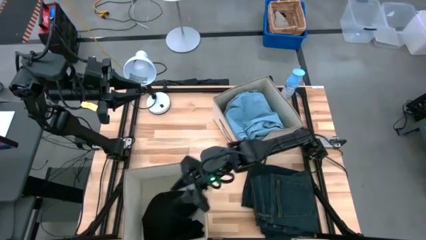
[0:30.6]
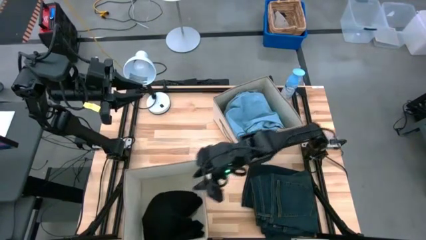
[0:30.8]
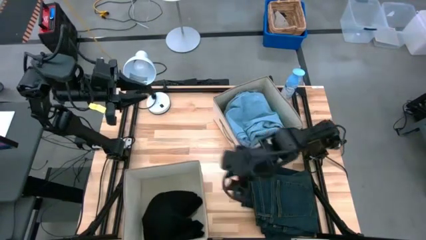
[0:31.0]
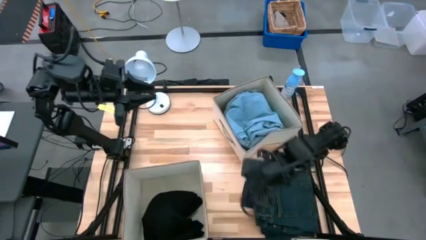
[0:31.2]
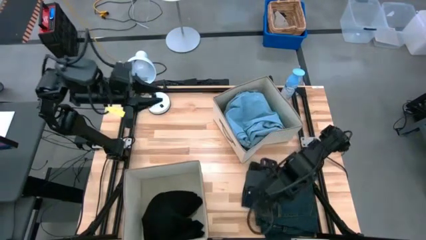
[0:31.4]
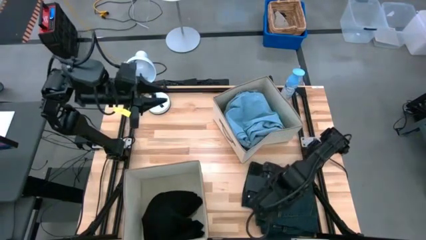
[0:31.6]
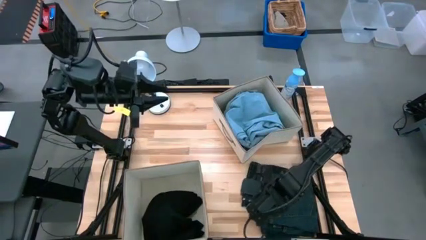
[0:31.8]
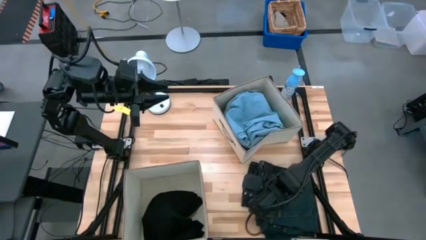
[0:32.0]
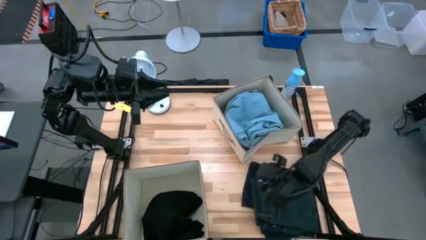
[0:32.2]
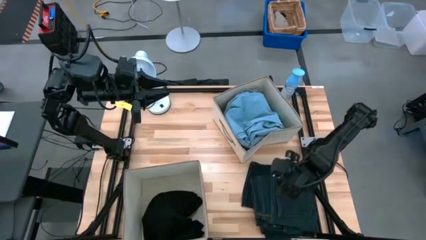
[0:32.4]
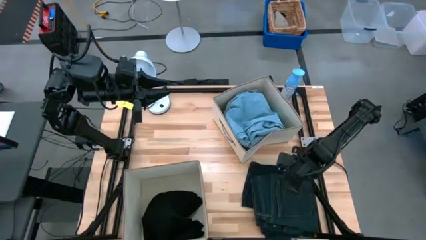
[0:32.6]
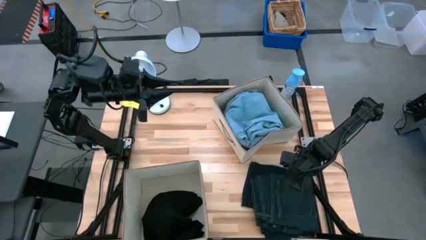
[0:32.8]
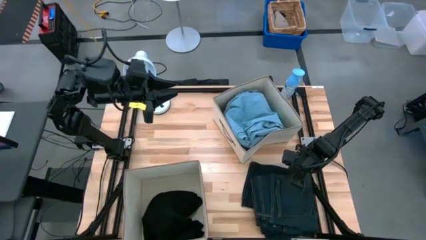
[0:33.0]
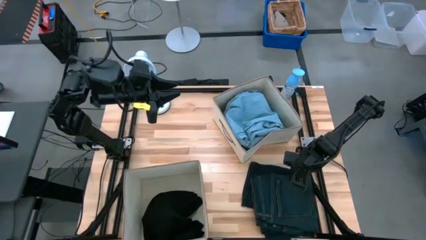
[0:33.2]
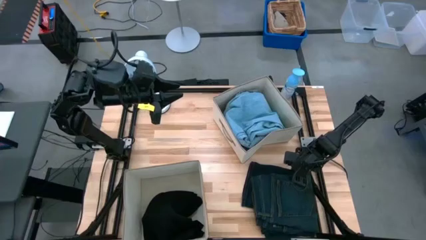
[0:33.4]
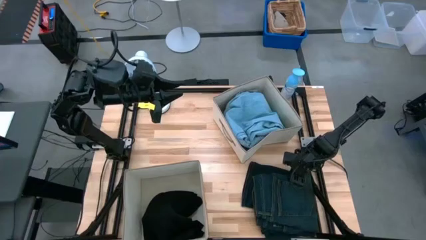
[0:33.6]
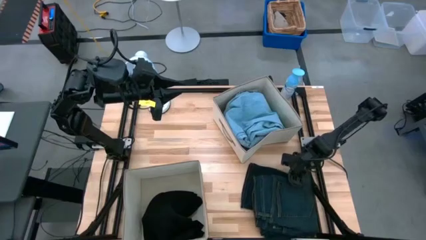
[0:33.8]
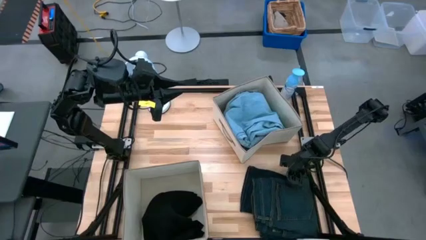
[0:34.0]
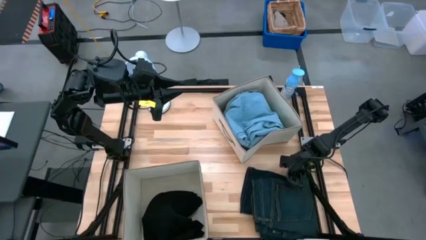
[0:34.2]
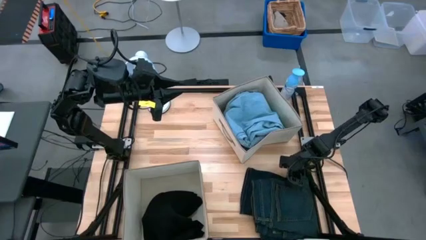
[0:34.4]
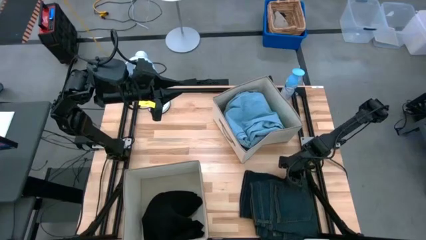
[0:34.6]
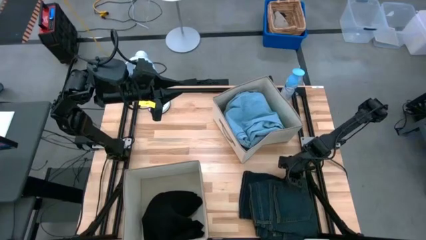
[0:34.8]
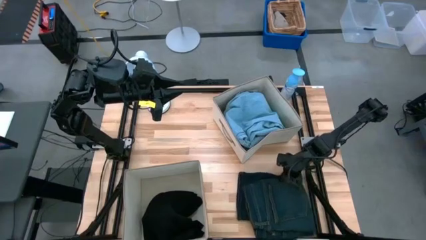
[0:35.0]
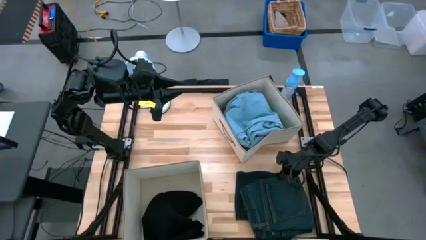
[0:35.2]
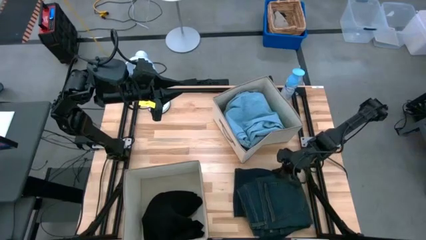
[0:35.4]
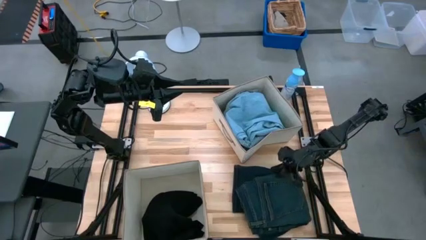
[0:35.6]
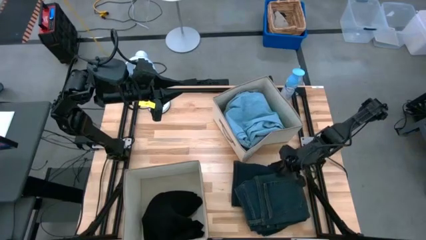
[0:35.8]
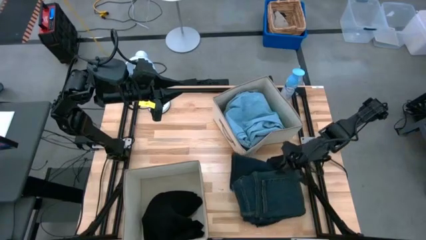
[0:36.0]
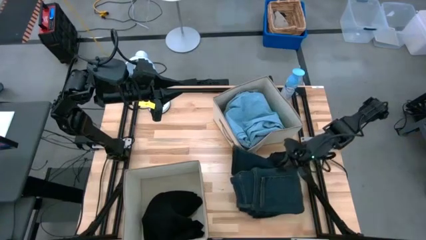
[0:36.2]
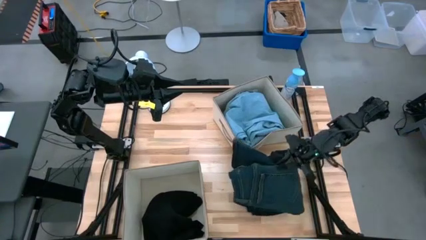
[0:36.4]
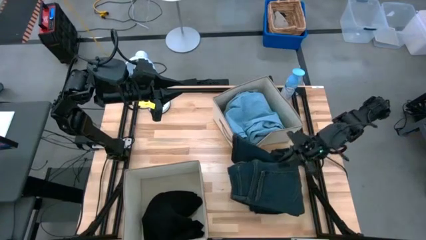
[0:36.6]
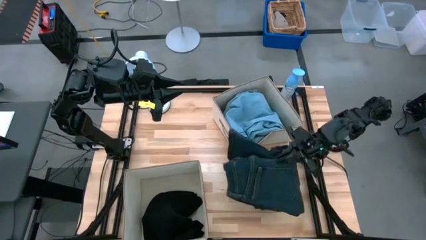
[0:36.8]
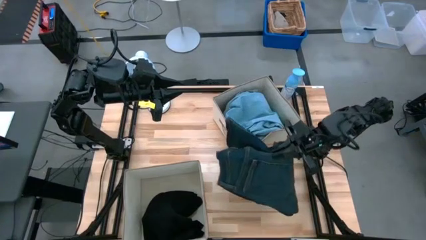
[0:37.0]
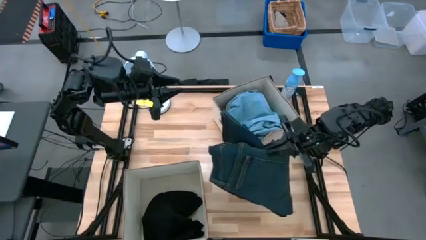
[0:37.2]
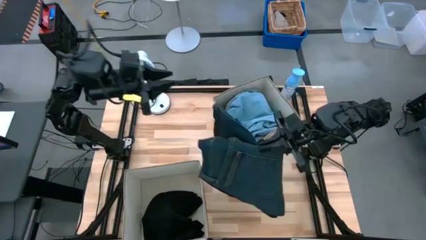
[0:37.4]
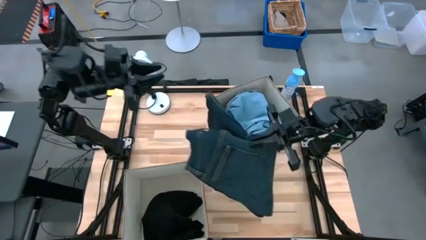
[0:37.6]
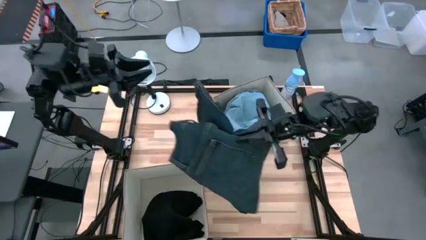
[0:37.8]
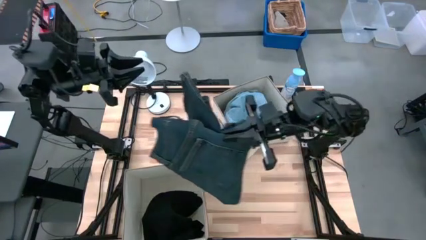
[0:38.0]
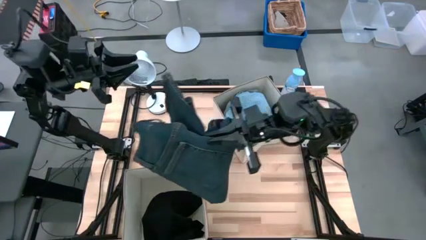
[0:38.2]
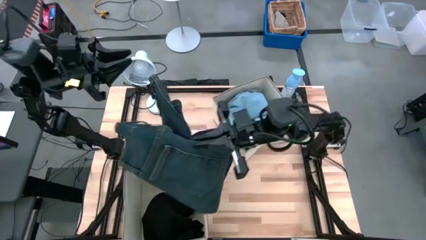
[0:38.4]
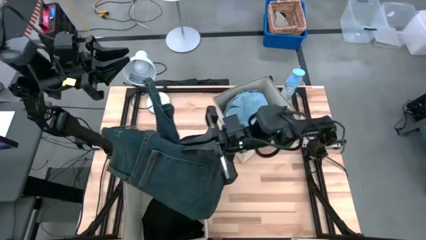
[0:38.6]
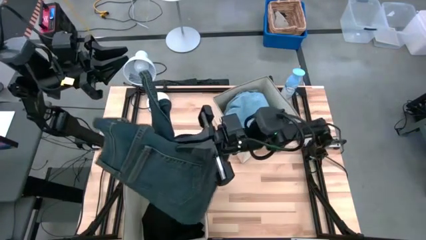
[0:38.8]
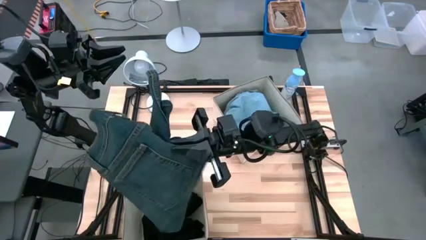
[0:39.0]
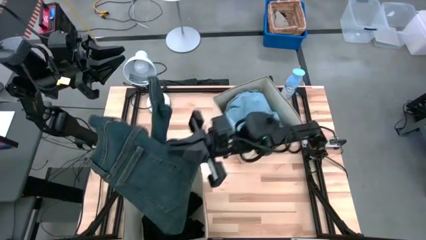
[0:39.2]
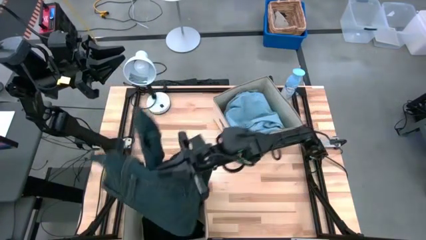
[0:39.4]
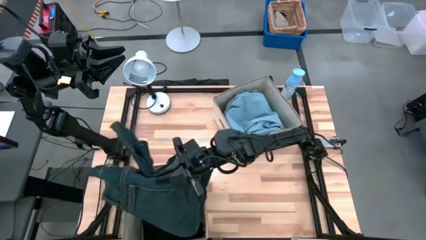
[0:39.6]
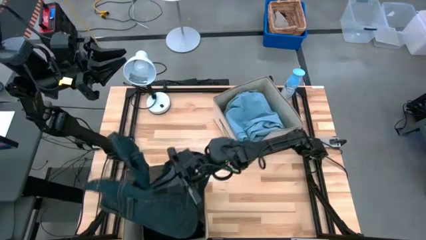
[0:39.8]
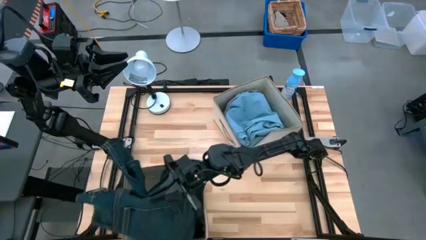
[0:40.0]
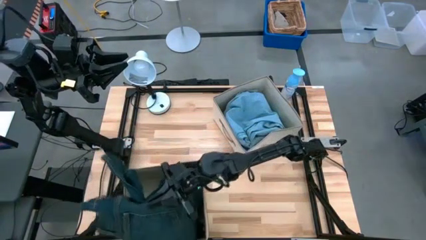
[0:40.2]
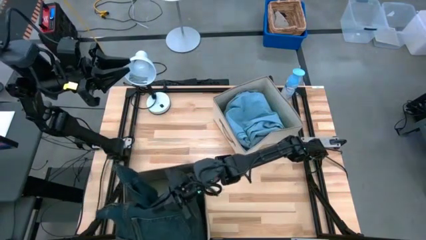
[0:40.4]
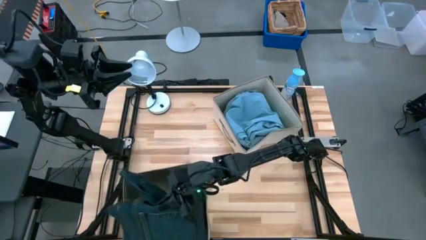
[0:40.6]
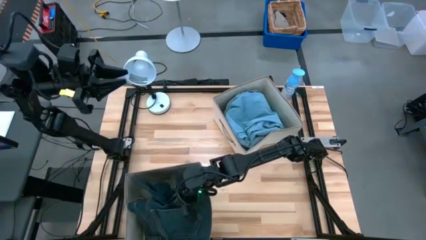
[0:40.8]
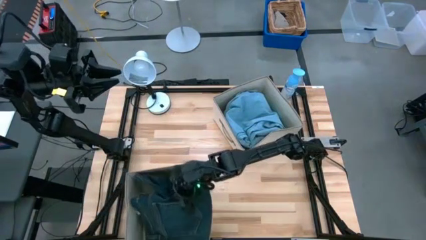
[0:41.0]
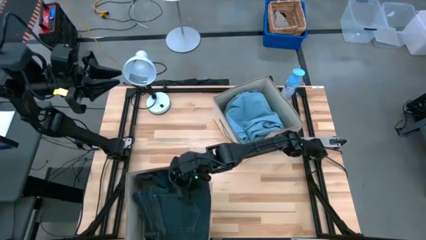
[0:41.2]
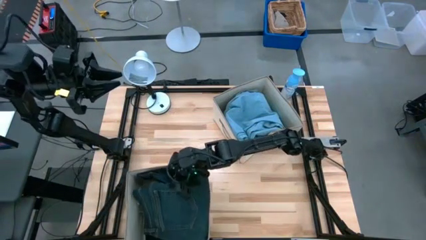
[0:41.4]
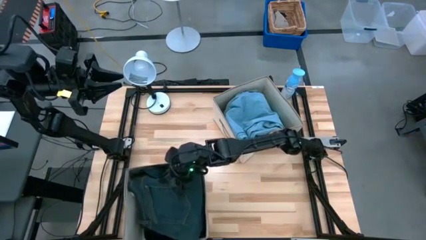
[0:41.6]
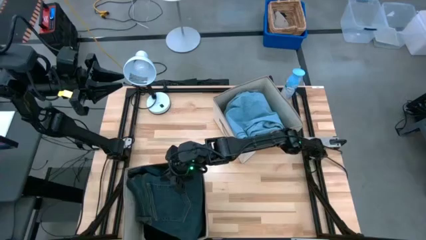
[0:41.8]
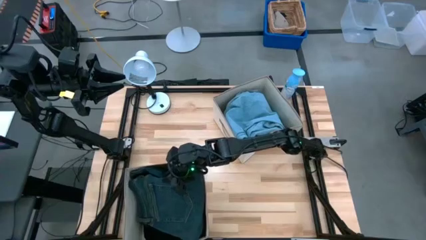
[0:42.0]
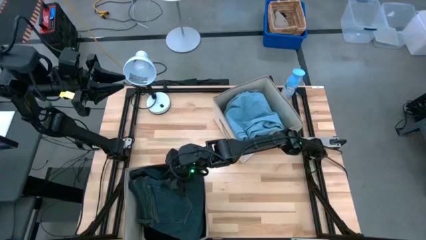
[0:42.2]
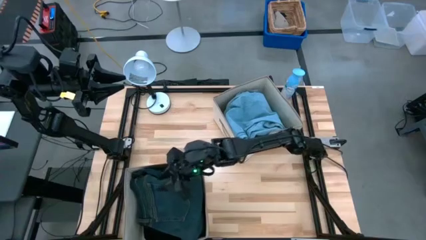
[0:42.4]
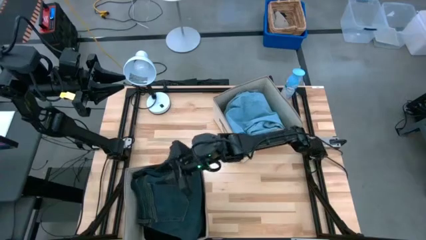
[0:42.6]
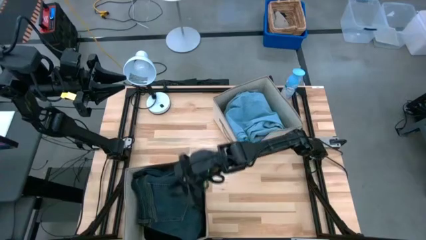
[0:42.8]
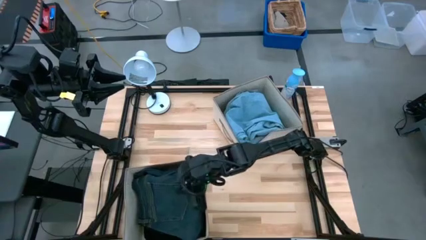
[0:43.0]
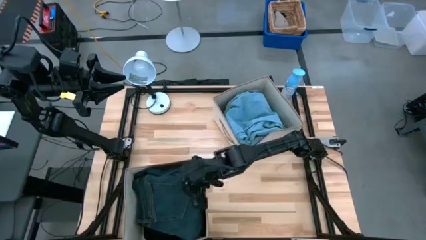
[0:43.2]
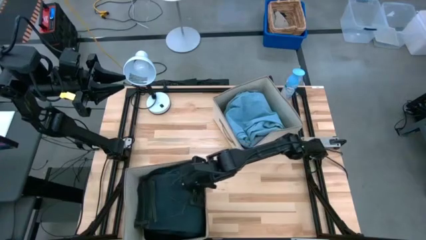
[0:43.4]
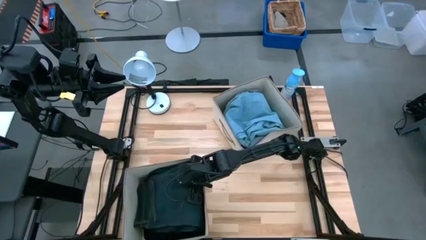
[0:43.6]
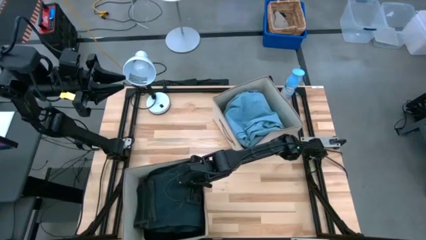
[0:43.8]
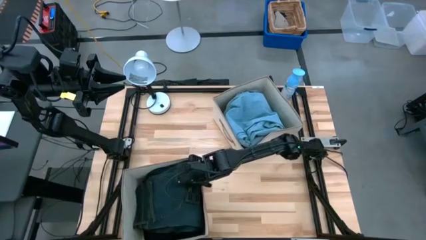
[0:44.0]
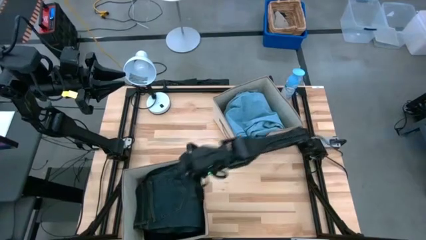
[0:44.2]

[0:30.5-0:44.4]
Task: Sort clothes
Put the dark blue pants into the bottom laundry organizer
